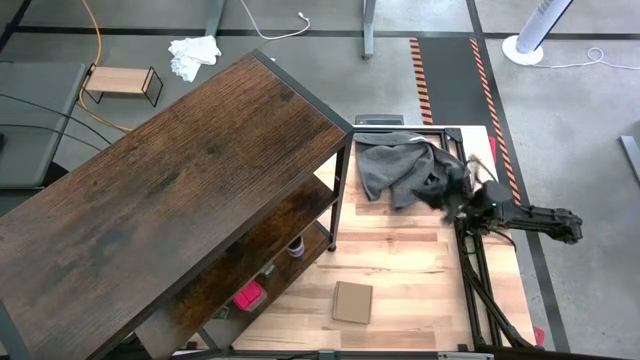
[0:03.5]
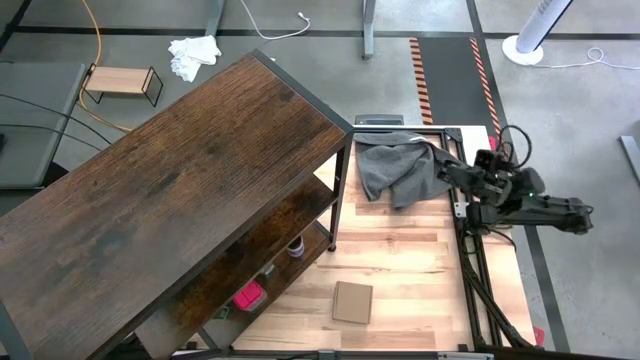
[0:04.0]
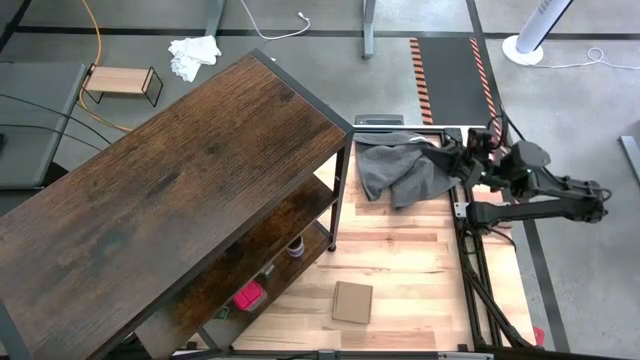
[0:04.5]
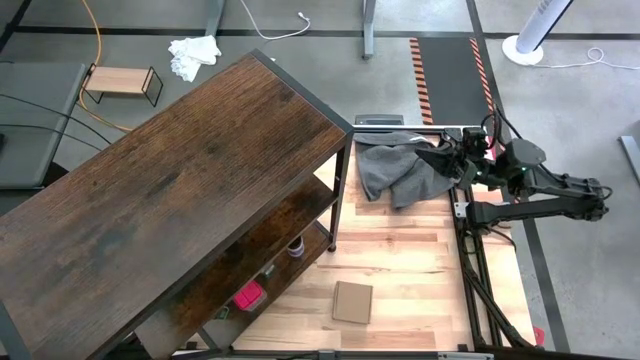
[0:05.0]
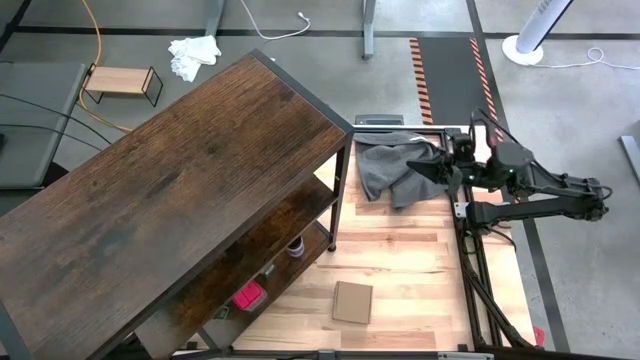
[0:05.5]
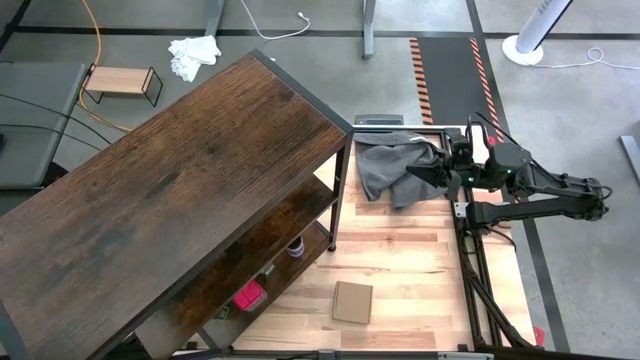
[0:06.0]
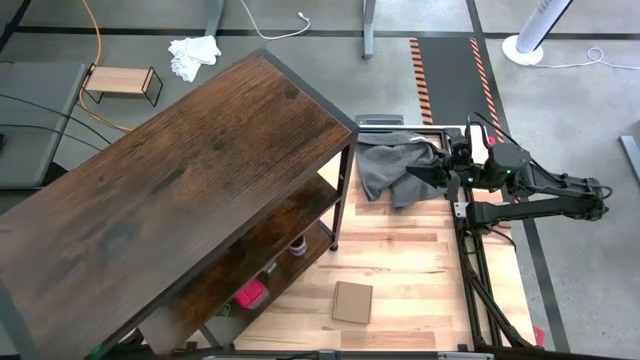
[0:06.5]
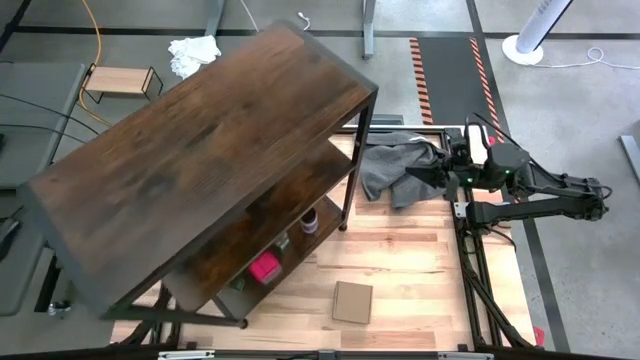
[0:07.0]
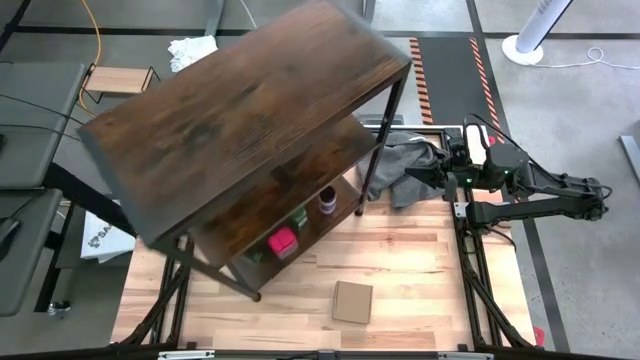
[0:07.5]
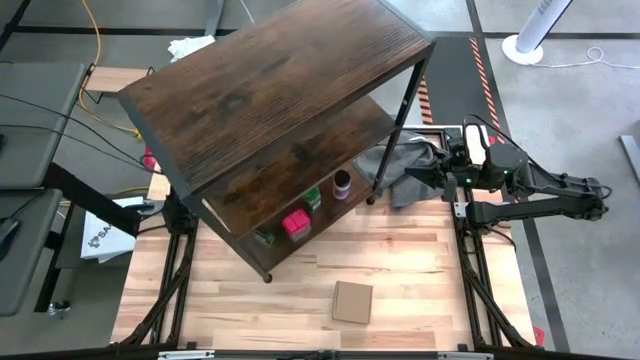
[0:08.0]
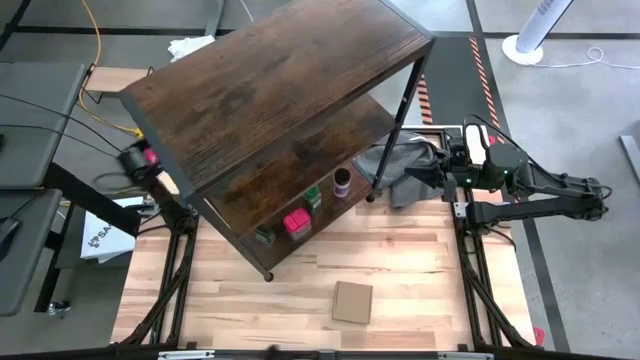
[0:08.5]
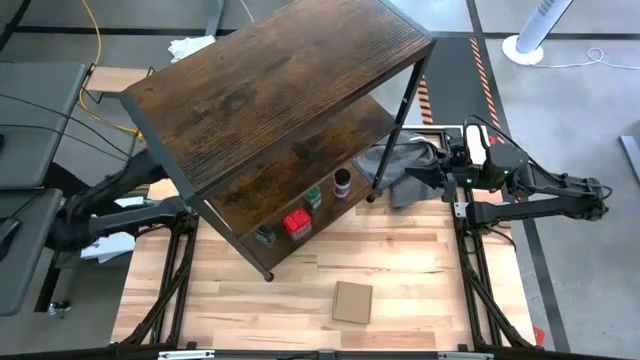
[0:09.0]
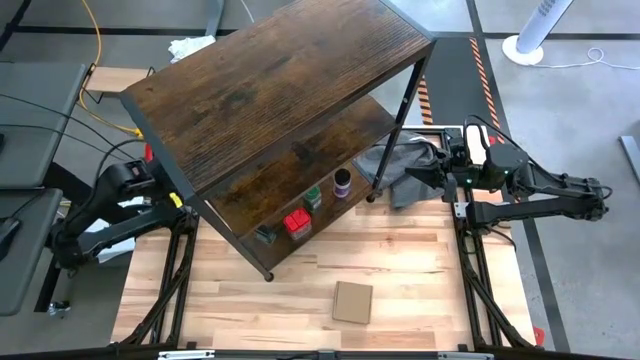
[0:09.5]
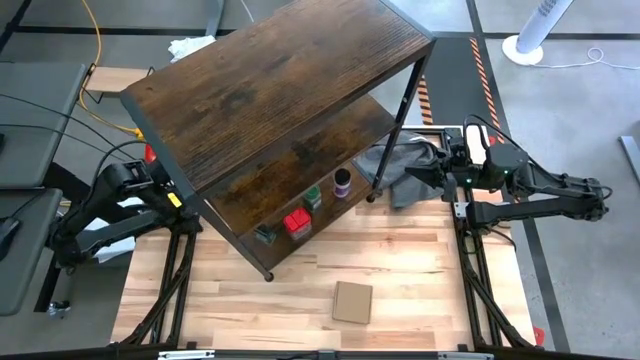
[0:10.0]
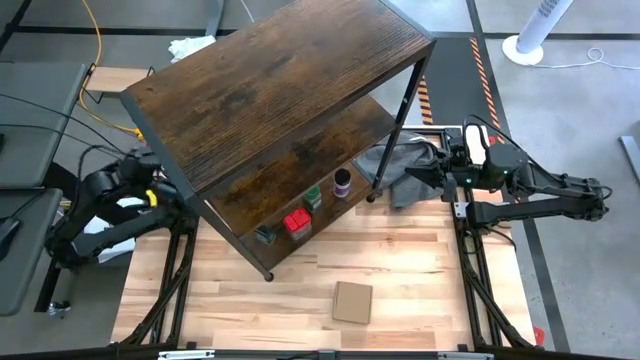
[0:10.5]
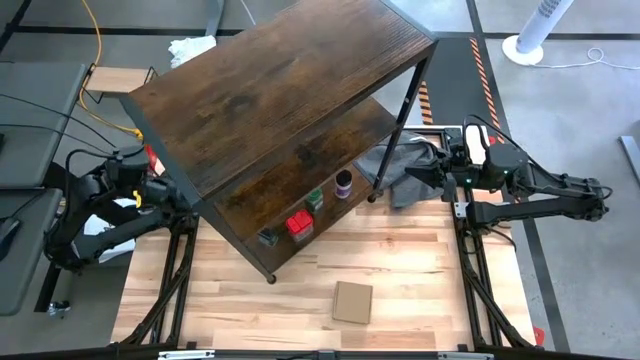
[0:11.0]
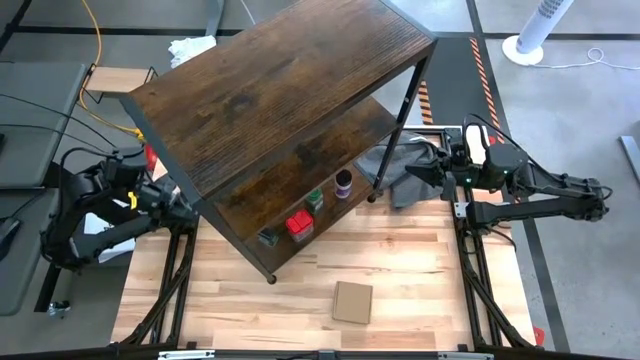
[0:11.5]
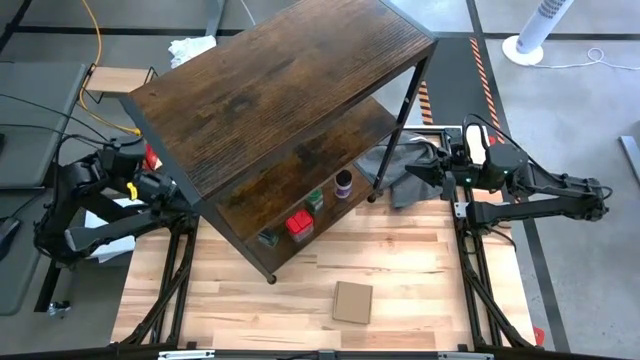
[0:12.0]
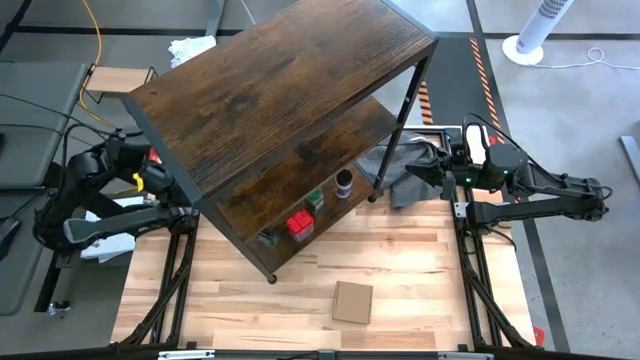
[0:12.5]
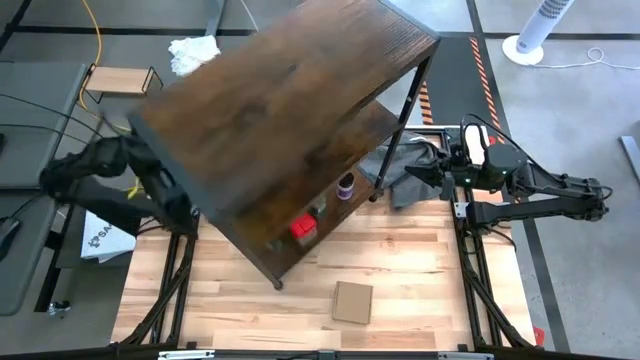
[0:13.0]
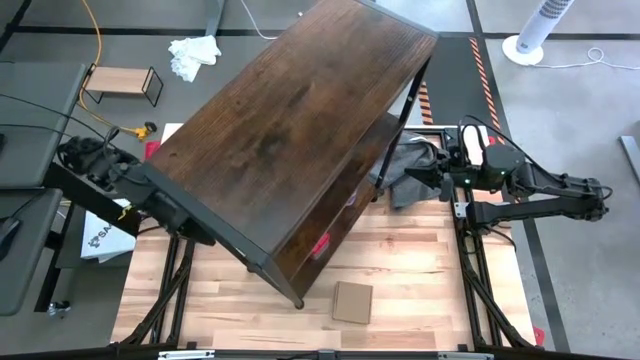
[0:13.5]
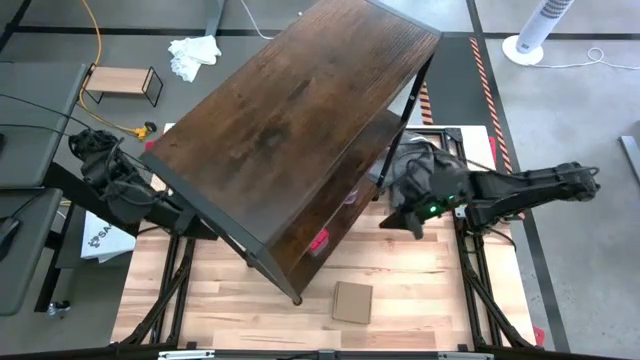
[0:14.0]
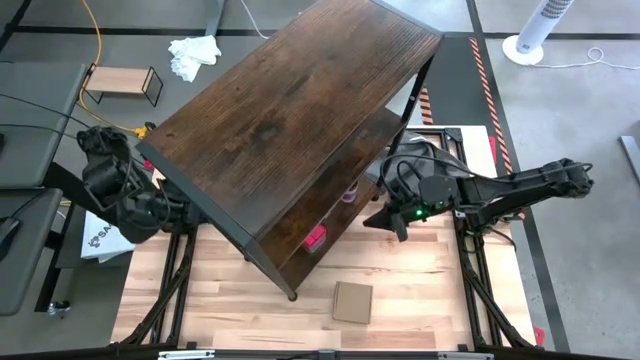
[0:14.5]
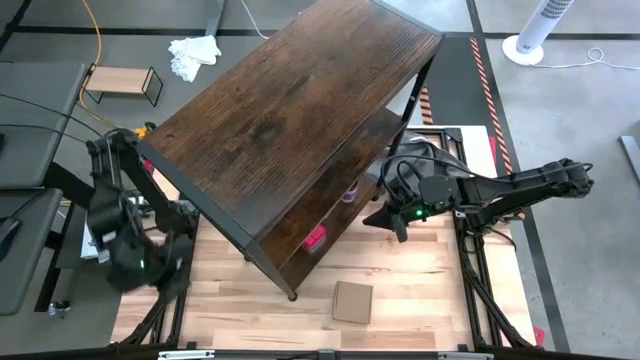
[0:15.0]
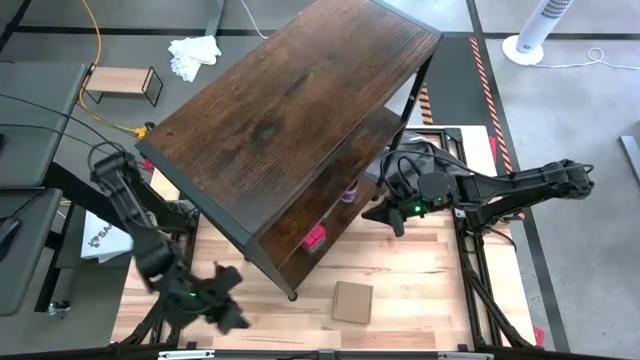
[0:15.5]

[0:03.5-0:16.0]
Task: Shelf spices
Move the shelf to the top of the table

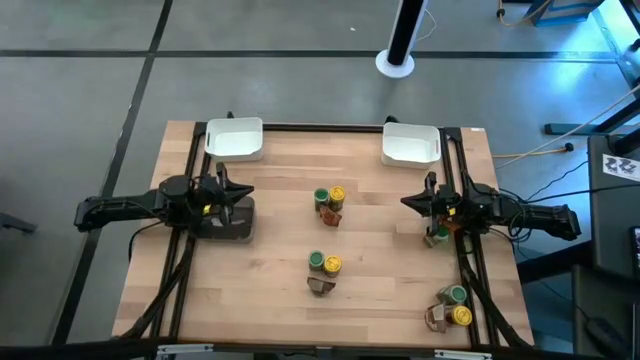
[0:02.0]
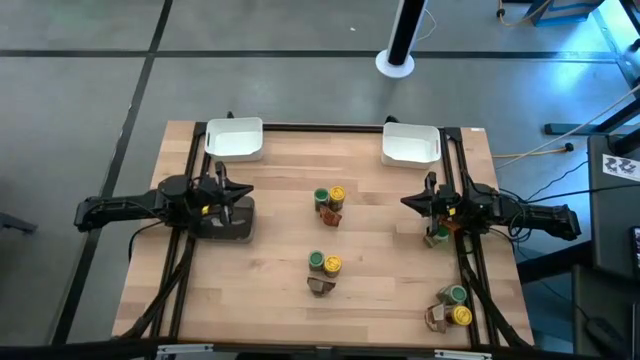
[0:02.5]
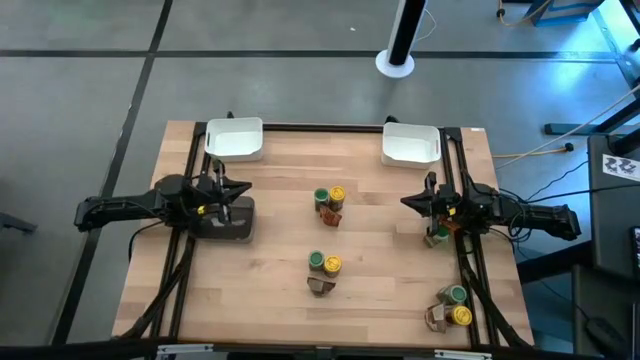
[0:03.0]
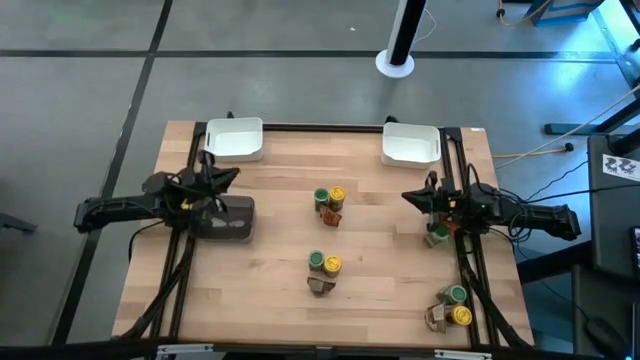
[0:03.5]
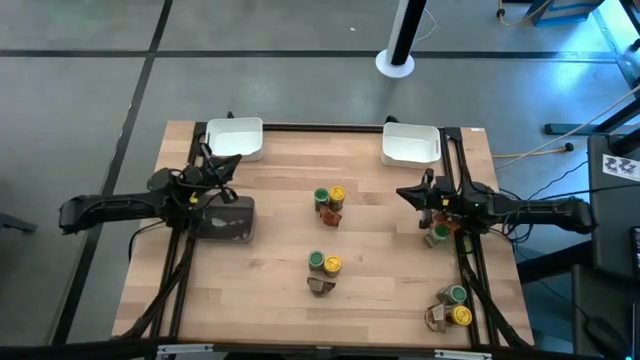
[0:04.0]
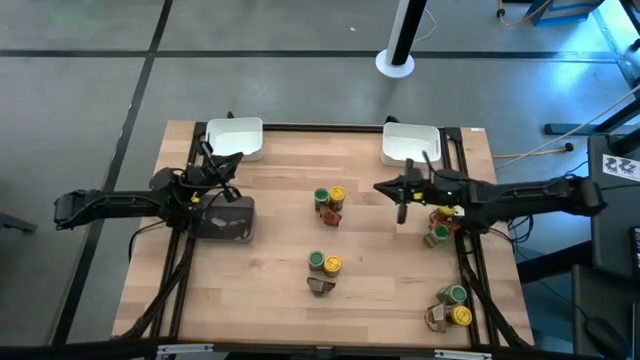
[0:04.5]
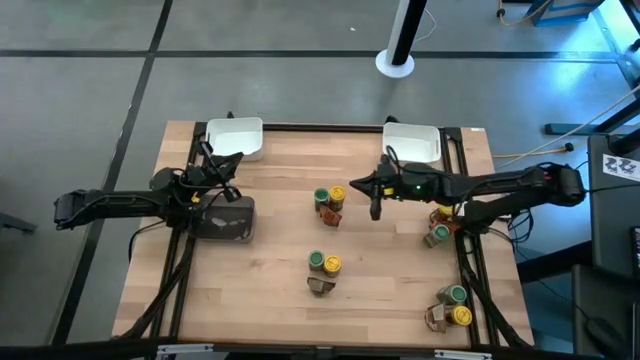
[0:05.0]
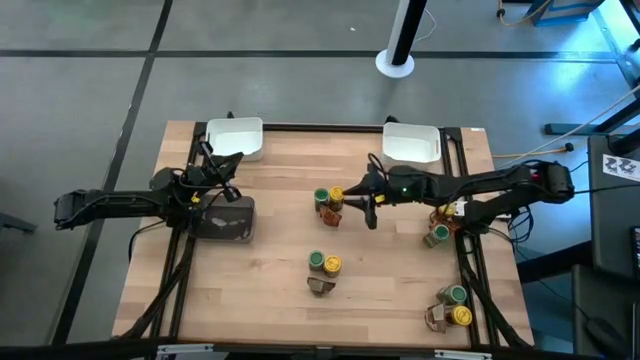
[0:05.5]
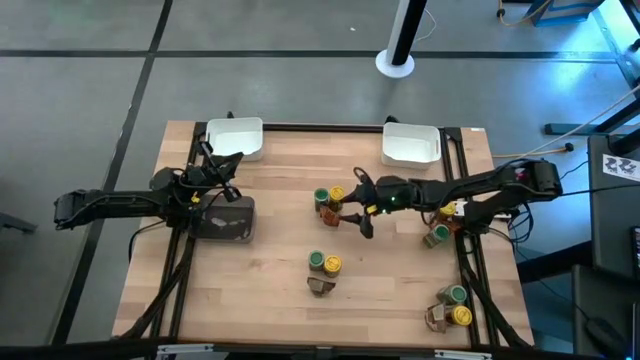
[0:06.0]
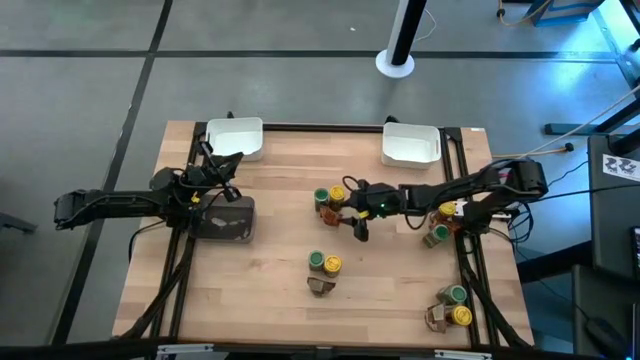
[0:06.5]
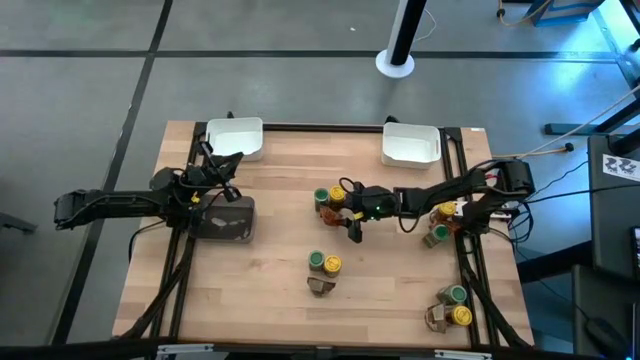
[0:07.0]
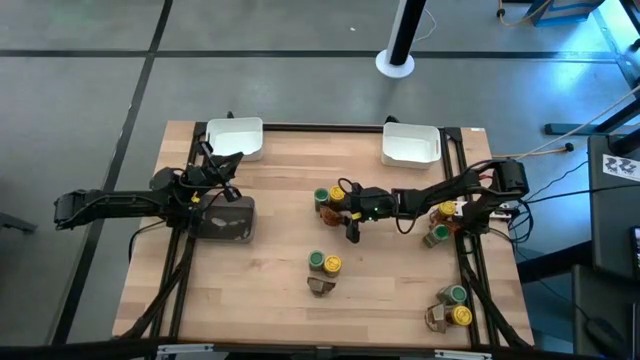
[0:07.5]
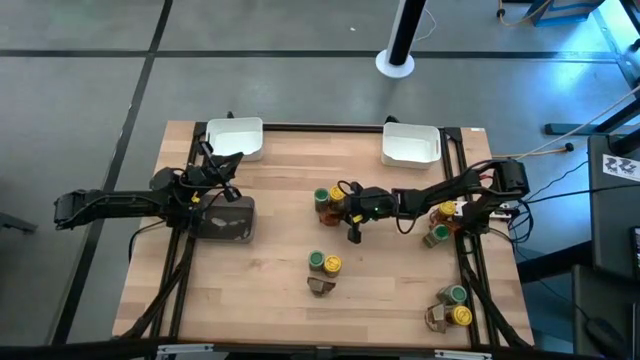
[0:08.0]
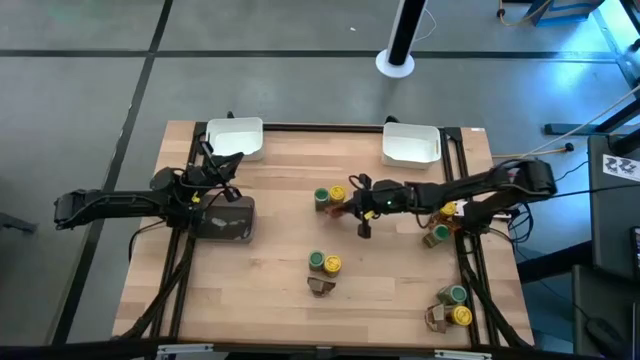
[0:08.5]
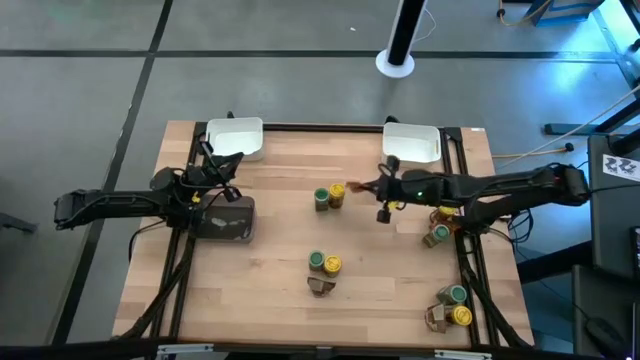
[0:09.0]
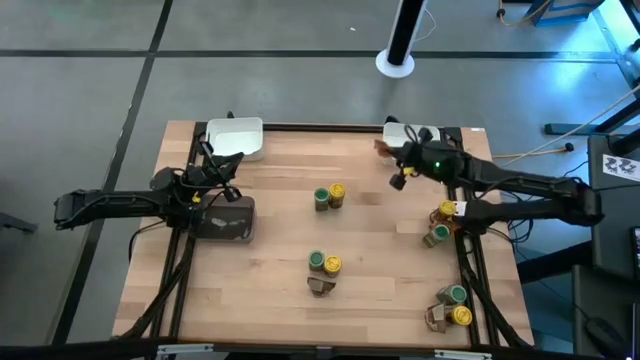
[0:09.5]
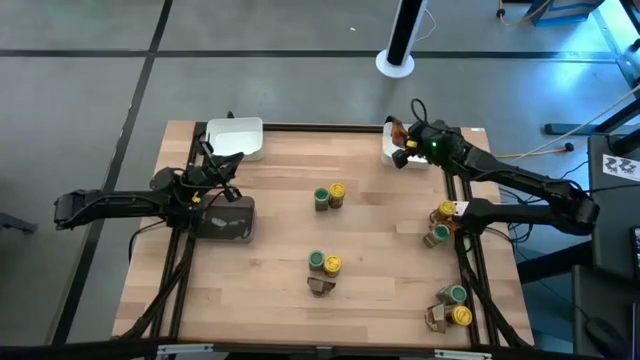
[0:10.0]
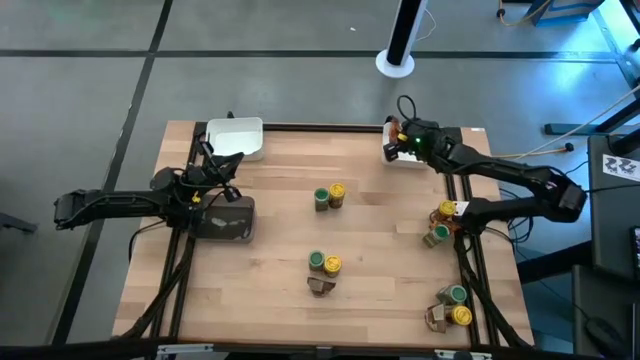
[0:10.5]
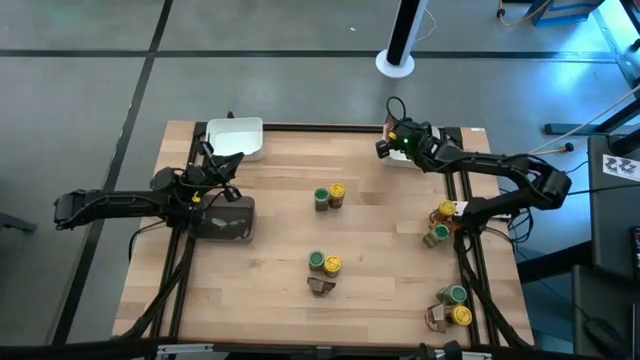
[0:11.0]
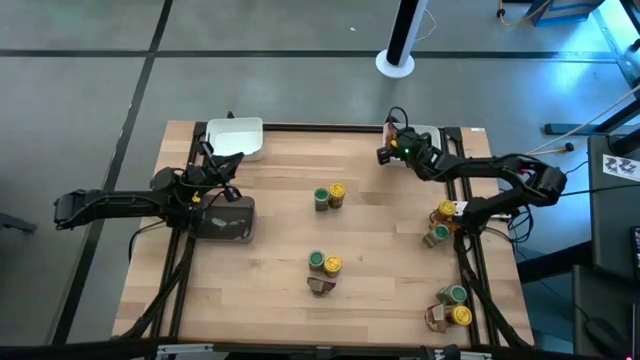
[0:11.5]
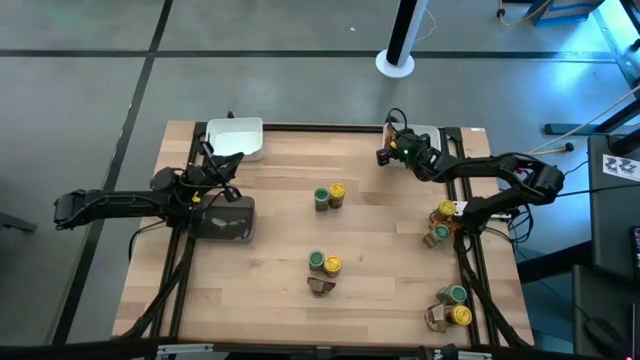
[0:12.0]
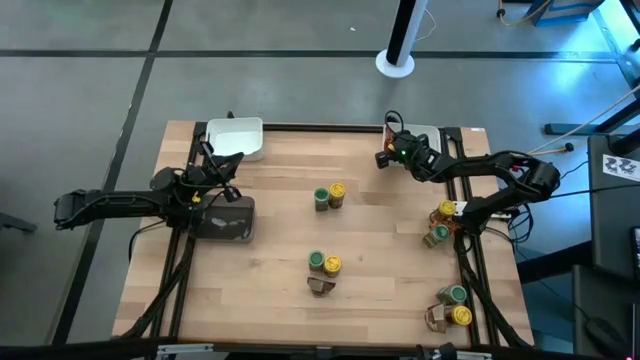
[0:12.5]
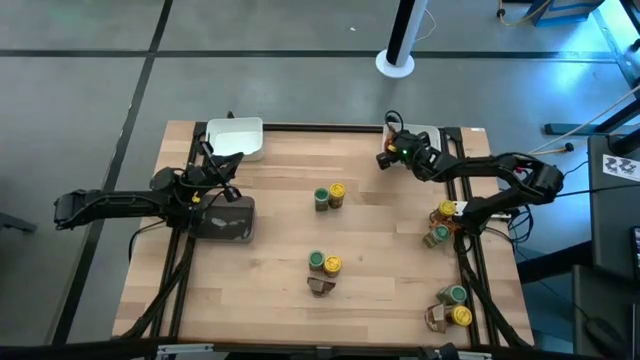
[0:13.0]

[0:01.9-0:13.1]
Task: Sort spices by type
Put the orange seasoning pack into the top right white bin
